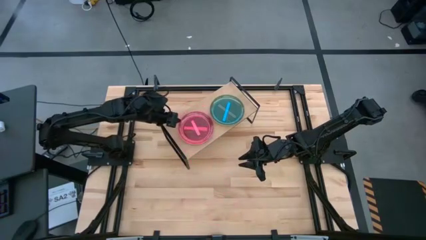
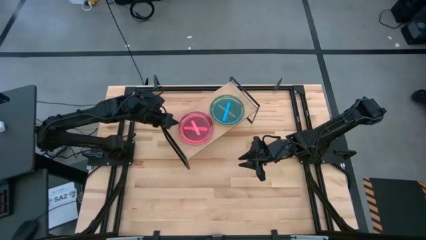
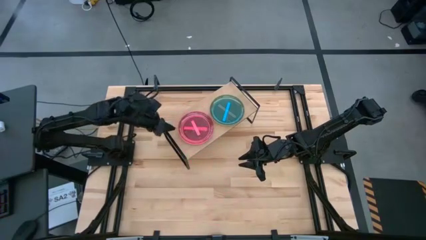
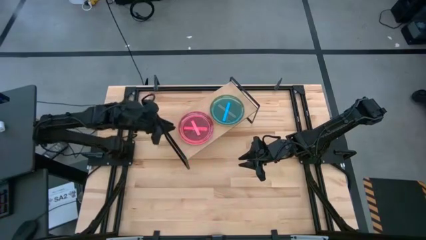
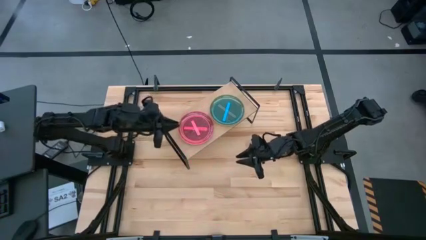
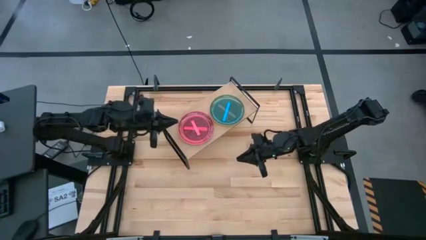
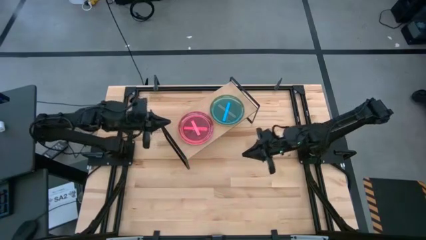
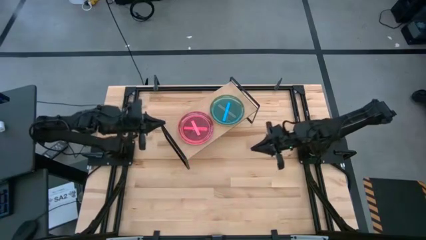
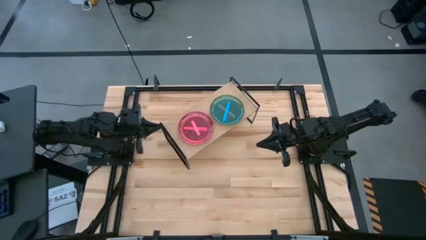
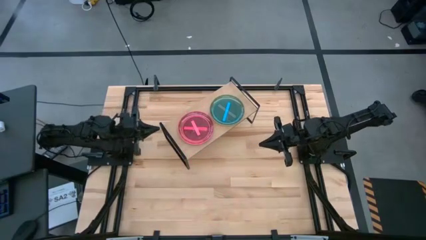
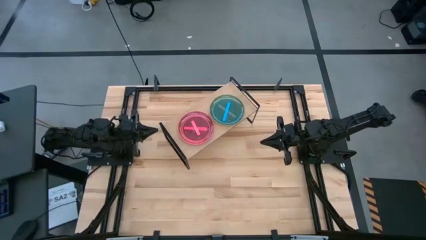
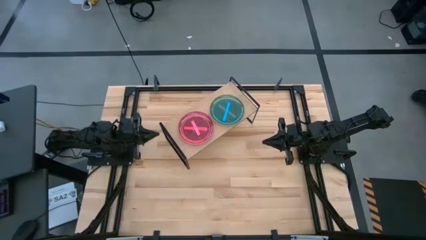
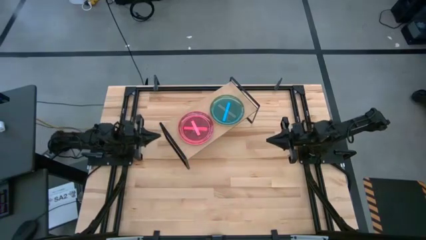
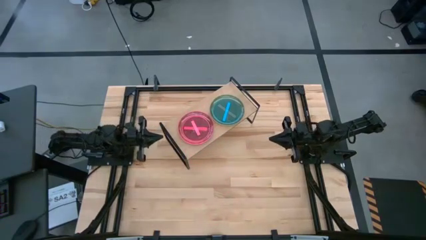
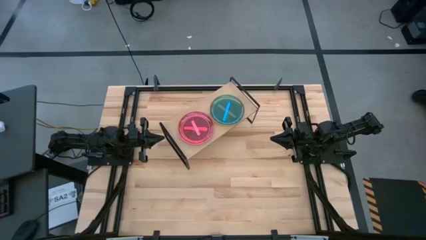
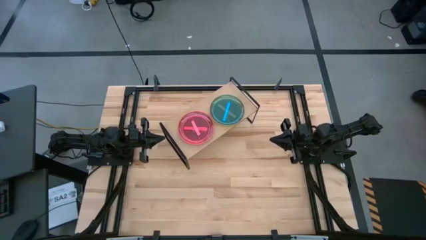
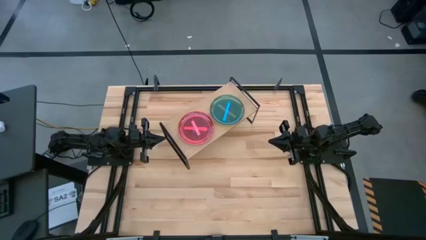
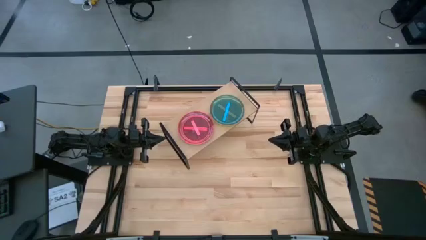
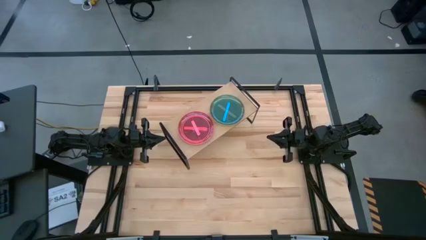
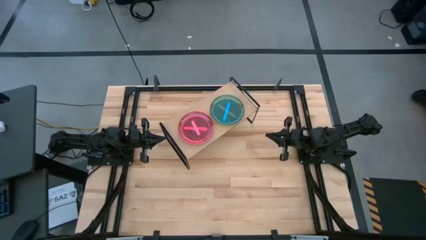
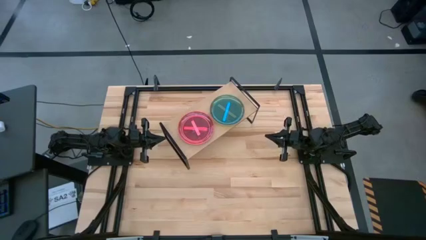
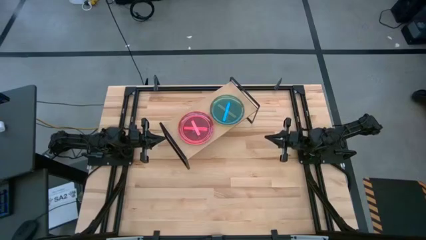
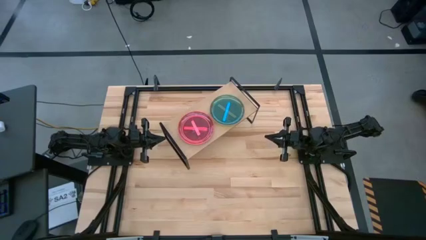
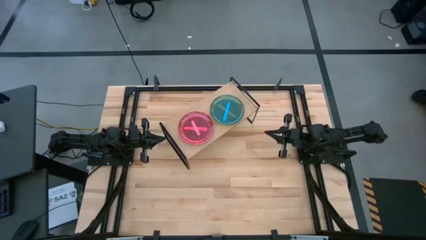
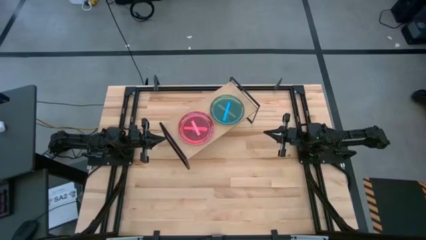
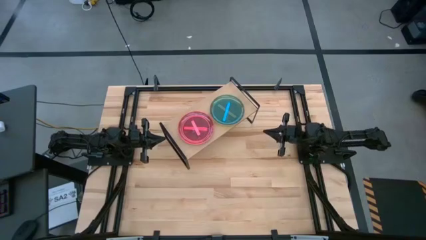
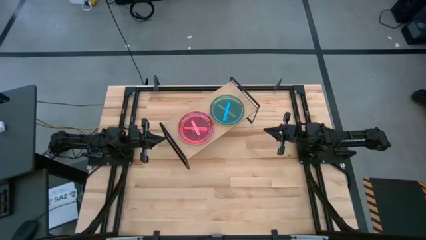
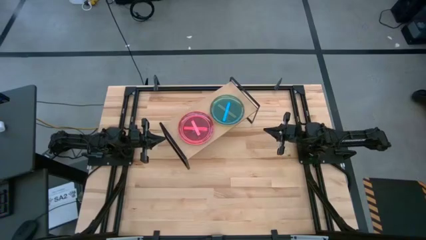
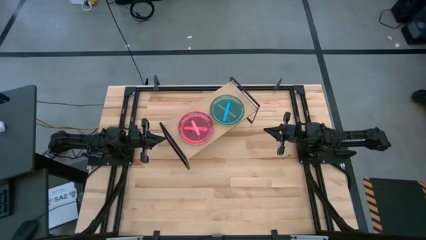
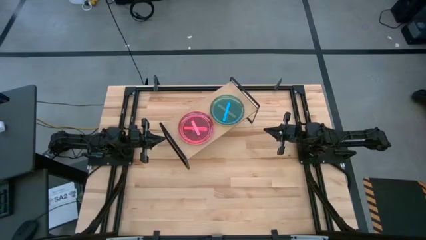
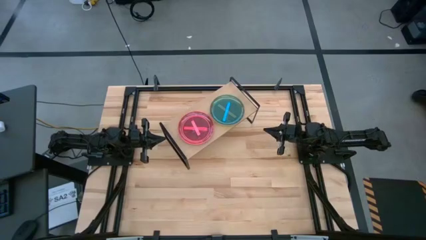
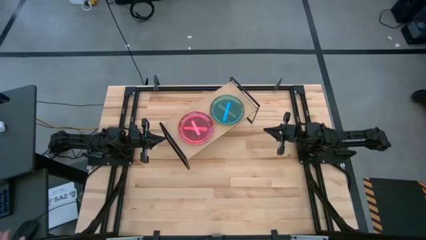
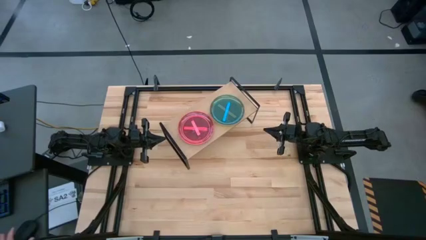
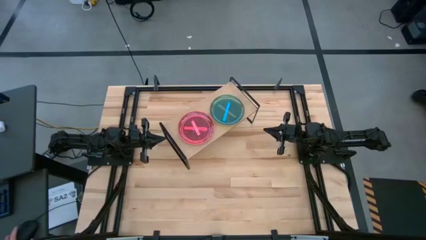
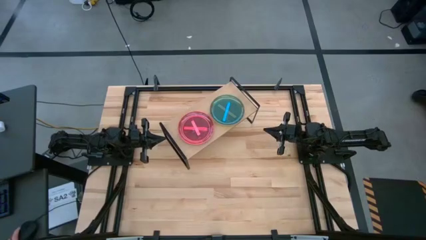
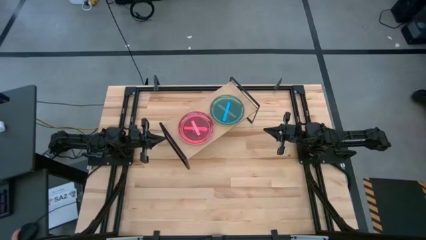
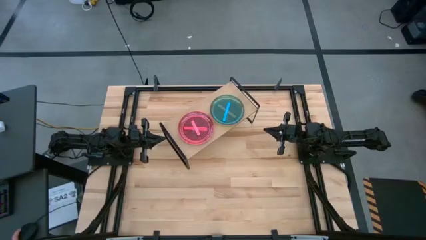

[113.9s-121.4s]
Task: Place and stack plates onto a shelf
Return to Home Position
